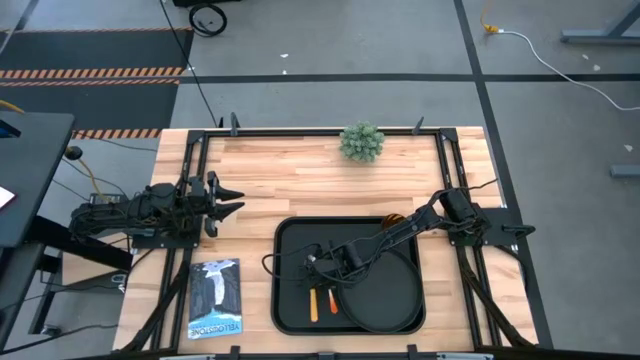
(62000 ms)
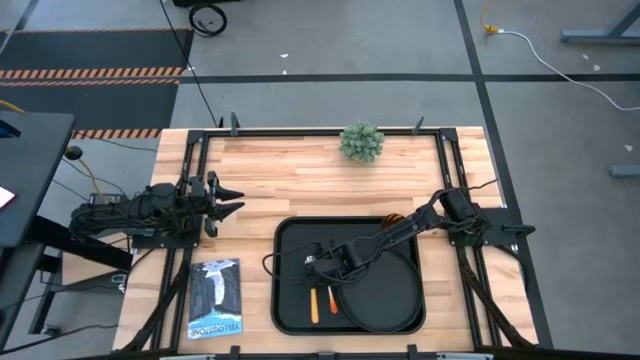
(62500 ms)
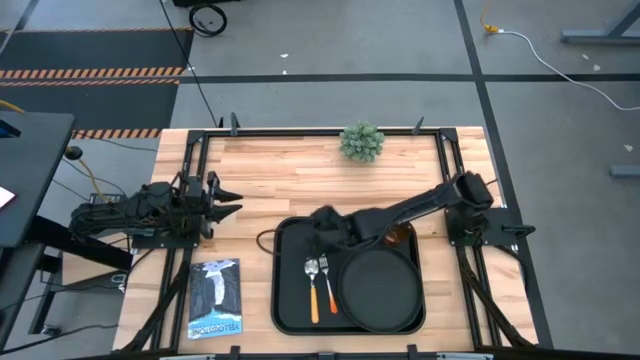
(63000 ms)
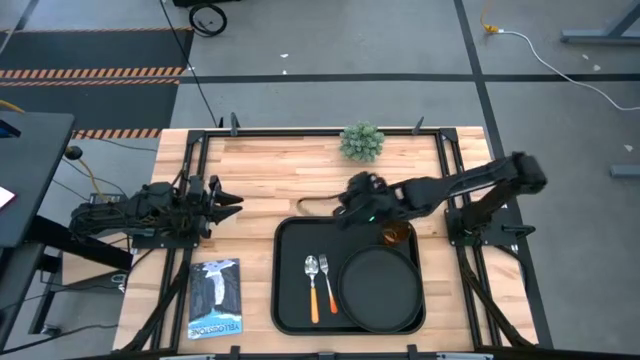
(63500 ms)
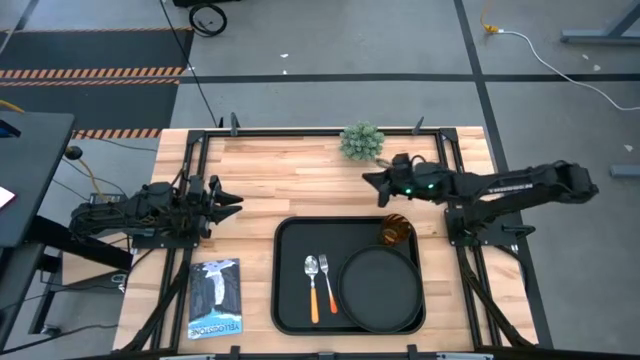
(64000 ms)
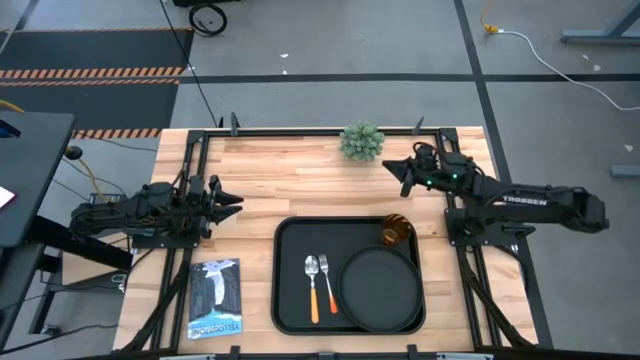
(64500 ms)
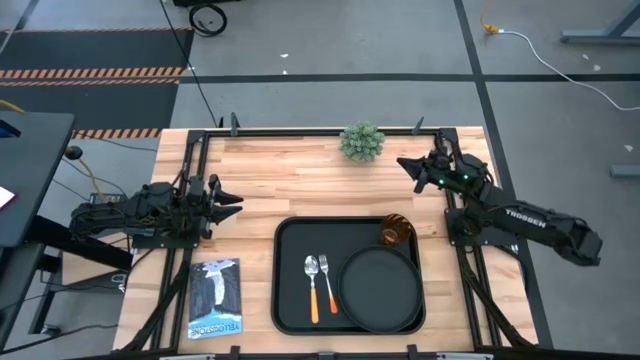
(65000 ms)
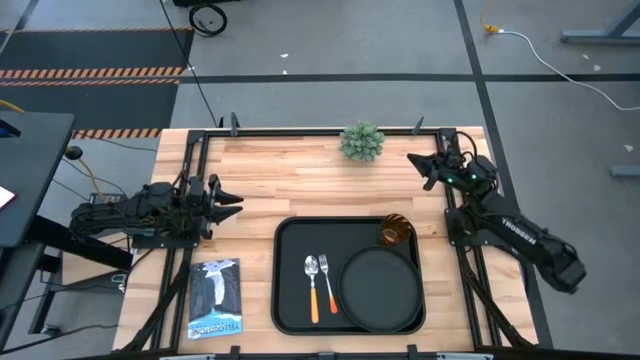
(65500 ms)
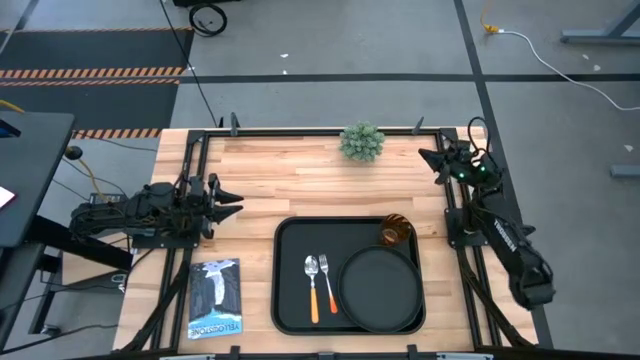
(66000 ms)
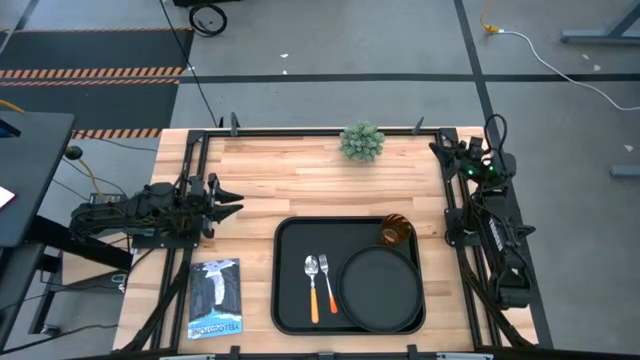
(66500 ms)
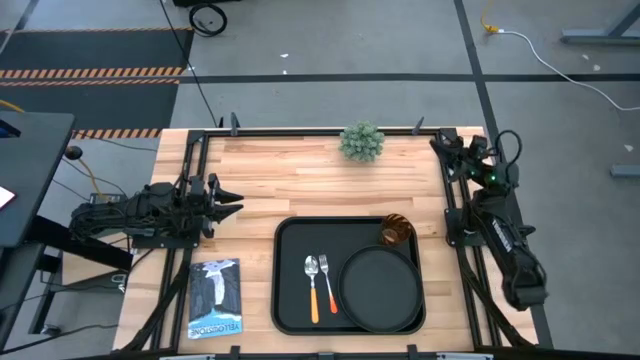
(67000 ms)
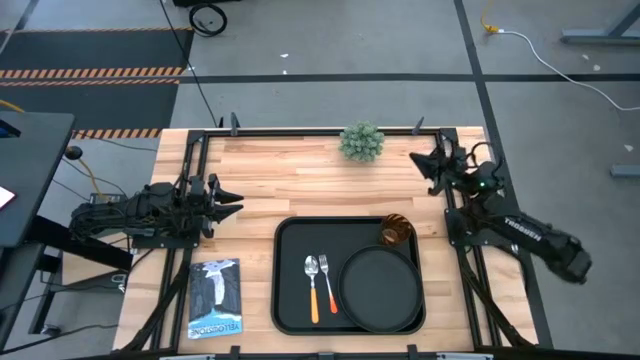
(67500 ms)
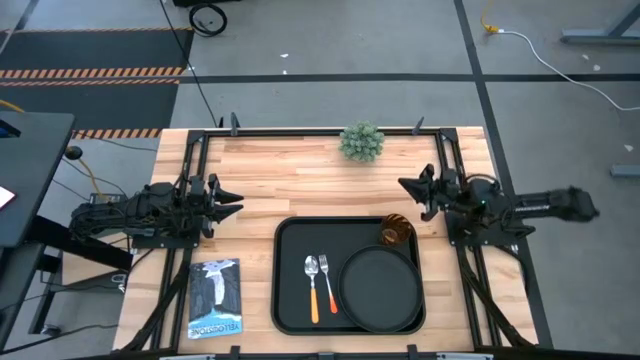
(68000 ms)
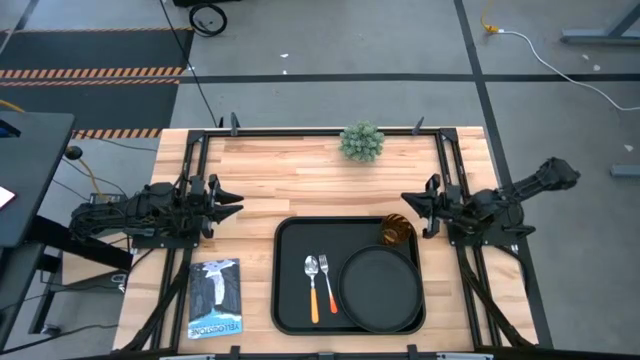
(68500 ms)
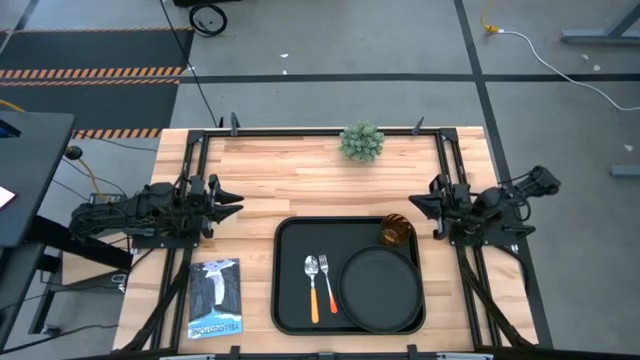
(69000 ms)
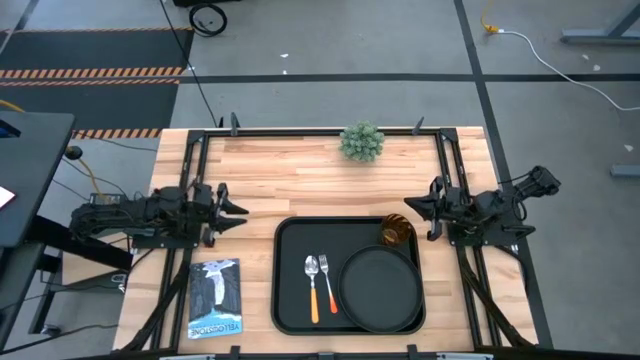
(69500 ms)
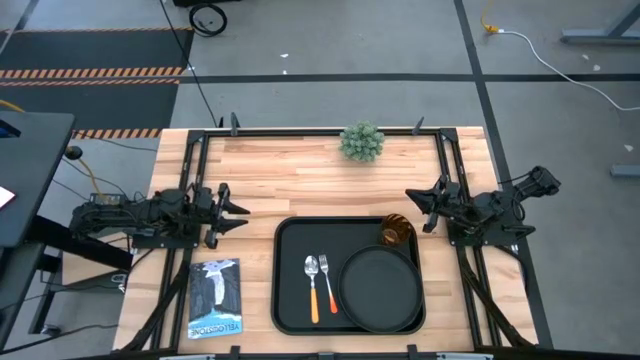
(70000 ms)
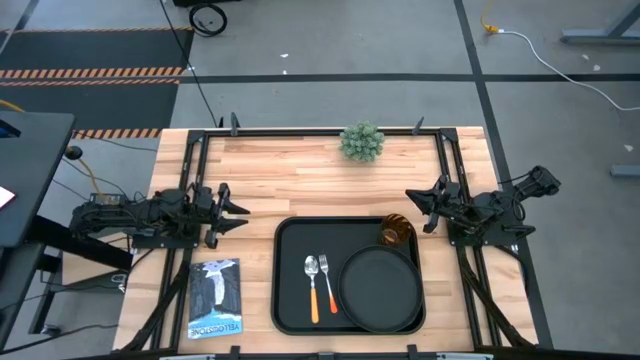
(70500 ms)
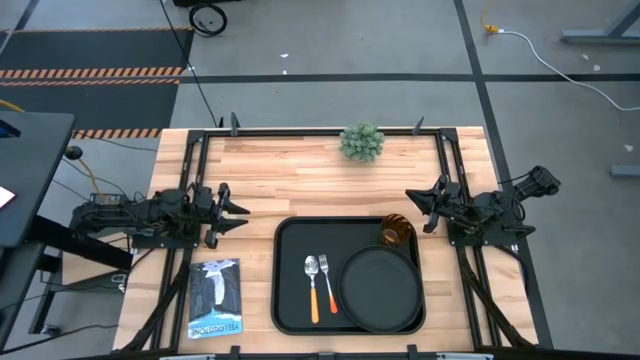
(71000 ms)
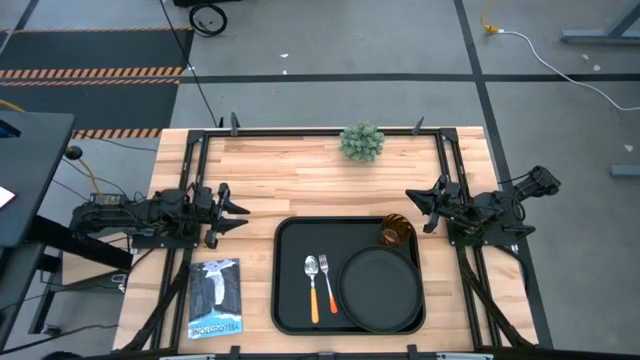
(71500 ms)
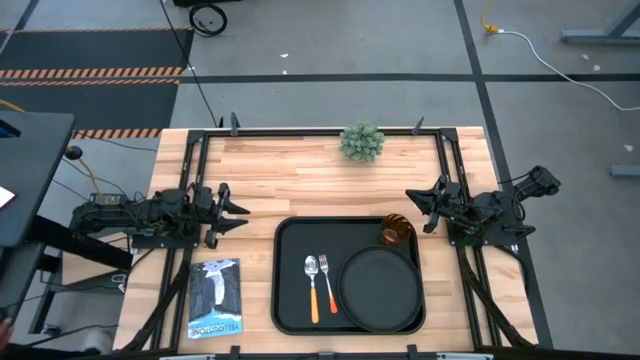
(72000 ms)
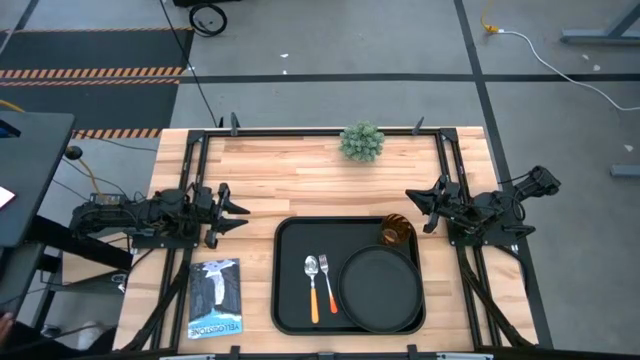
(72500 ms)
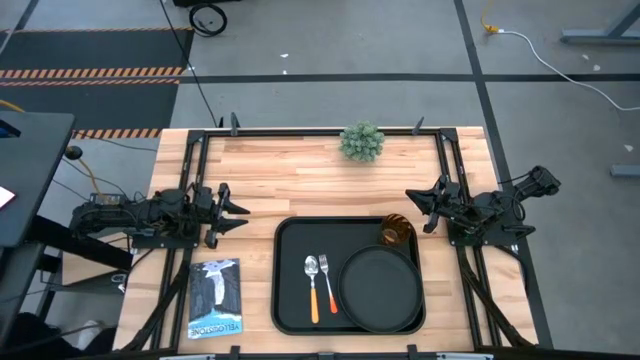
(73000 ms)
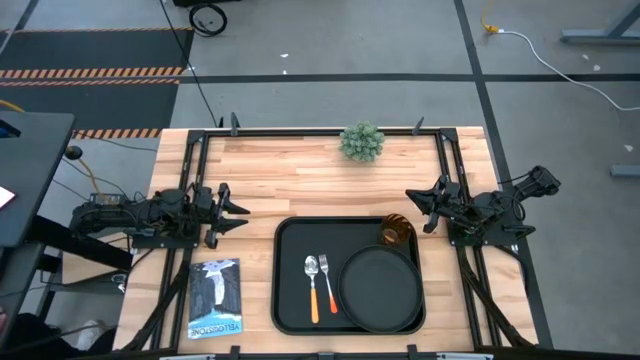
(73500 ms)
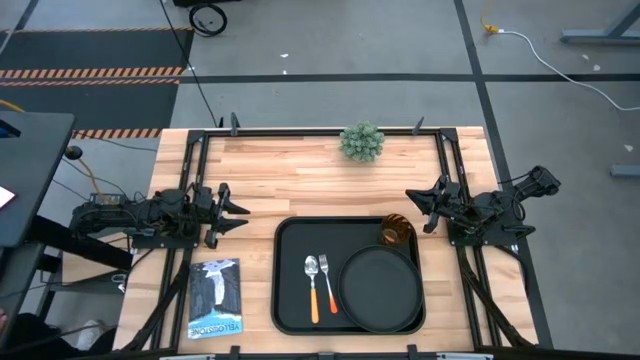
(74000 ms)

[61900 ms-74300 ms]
Task: Pick and place plate/cup/fork/spoon on tray
Return to Home Position

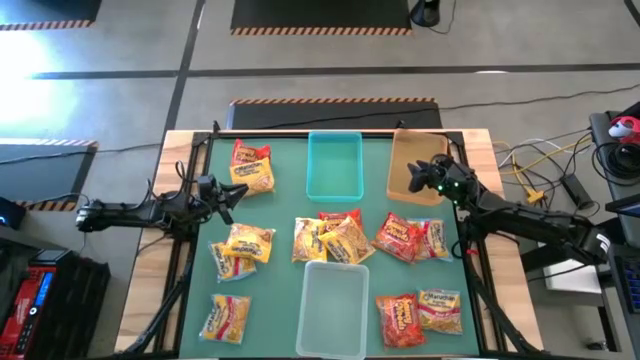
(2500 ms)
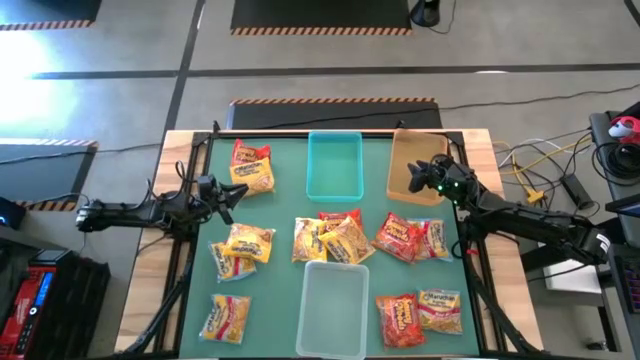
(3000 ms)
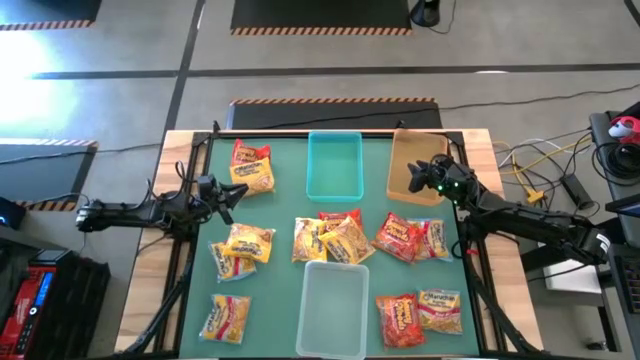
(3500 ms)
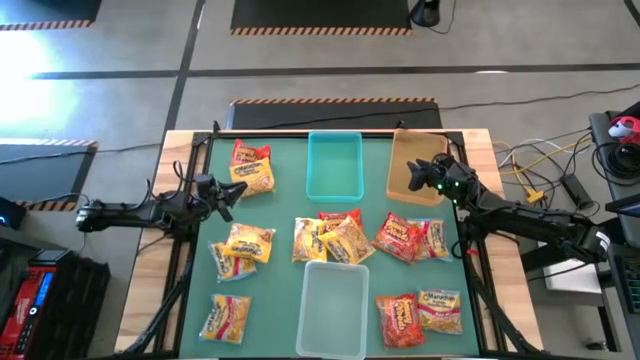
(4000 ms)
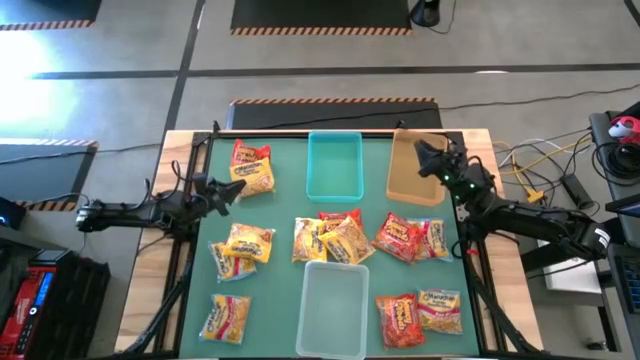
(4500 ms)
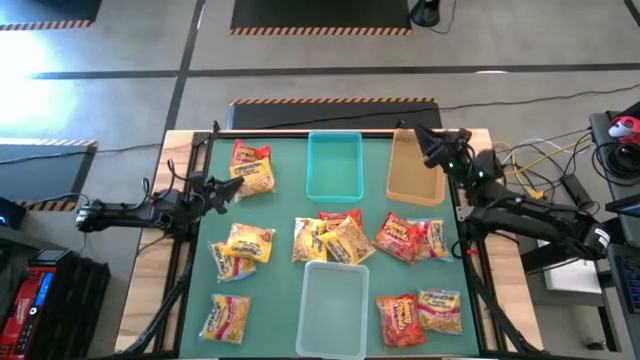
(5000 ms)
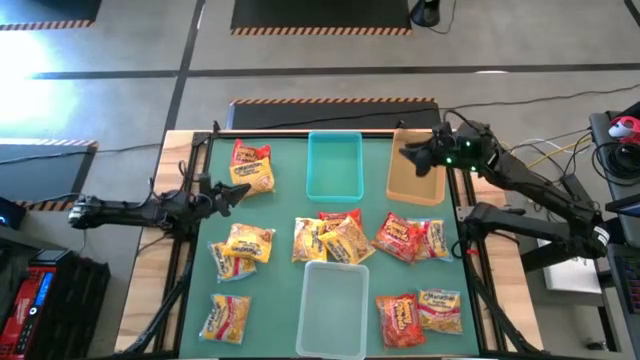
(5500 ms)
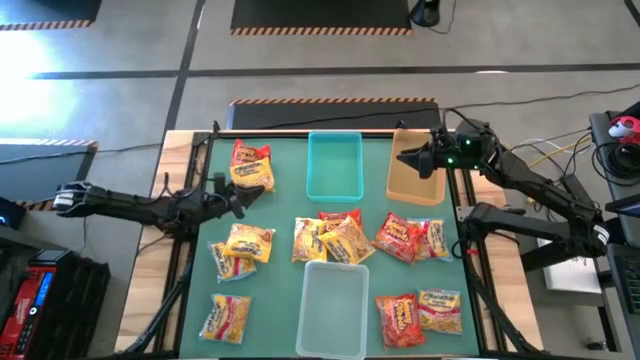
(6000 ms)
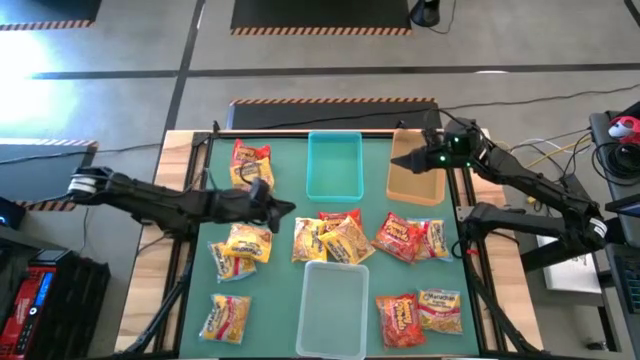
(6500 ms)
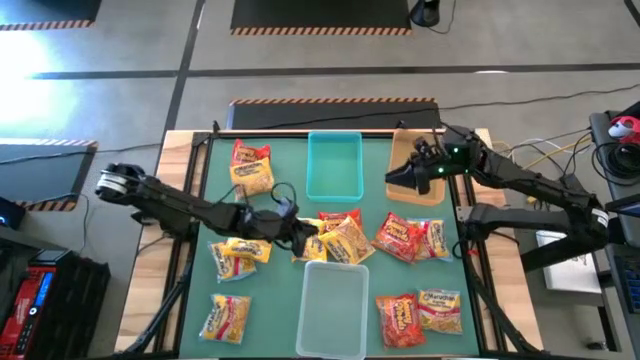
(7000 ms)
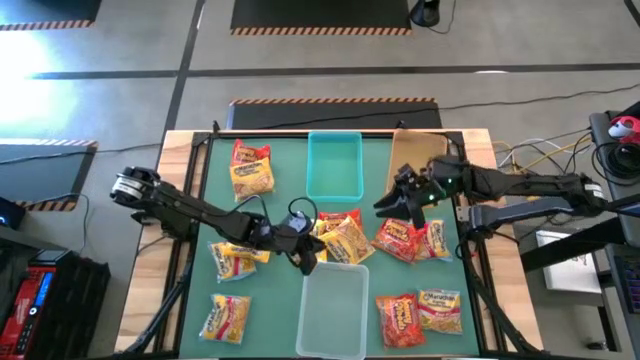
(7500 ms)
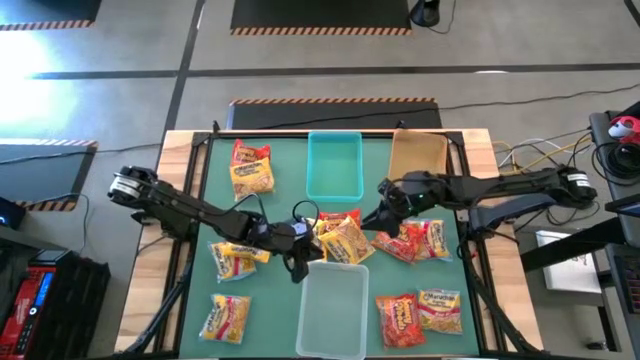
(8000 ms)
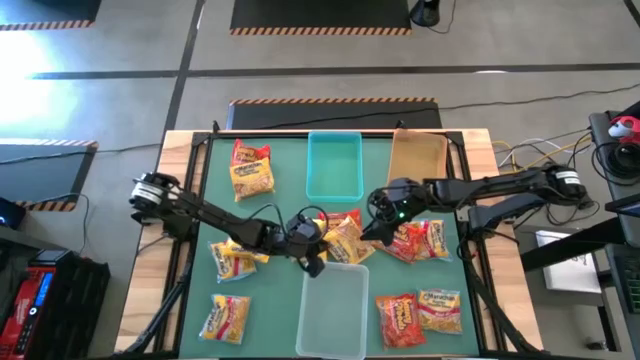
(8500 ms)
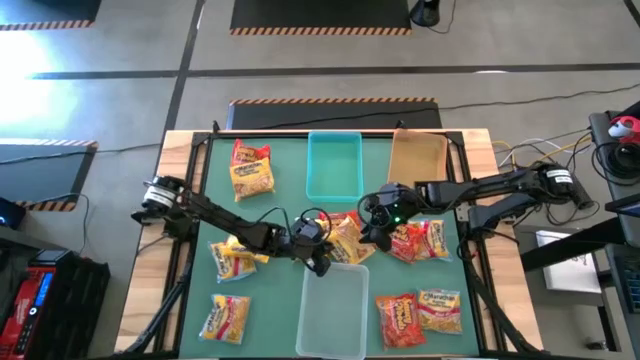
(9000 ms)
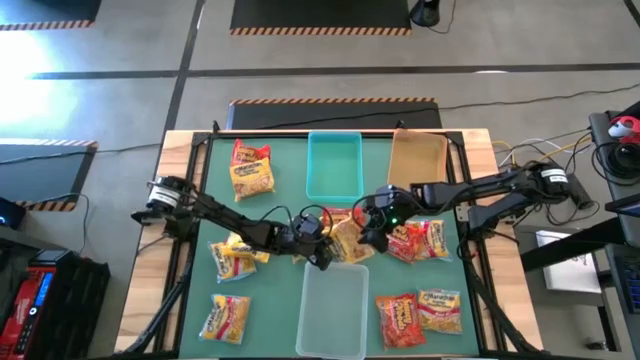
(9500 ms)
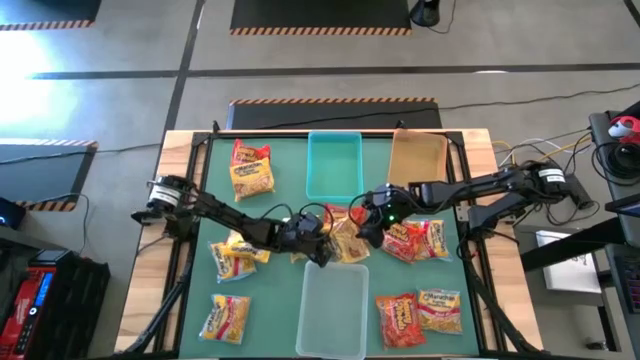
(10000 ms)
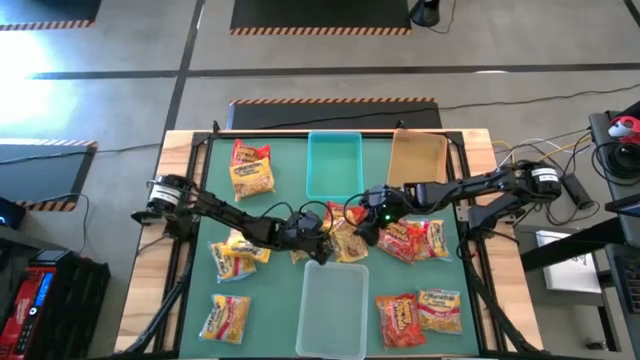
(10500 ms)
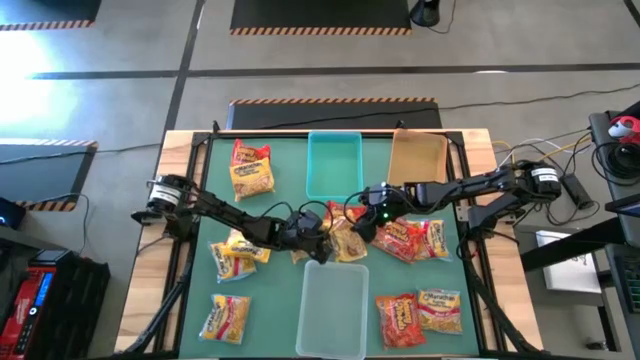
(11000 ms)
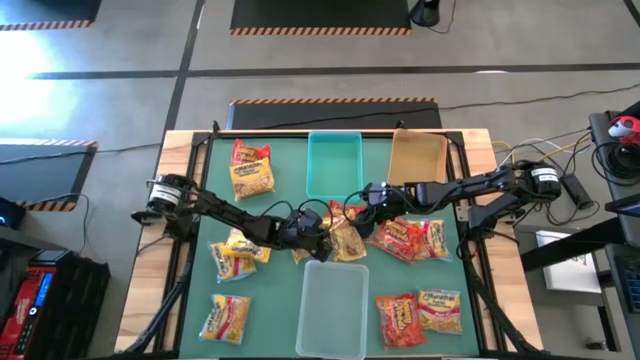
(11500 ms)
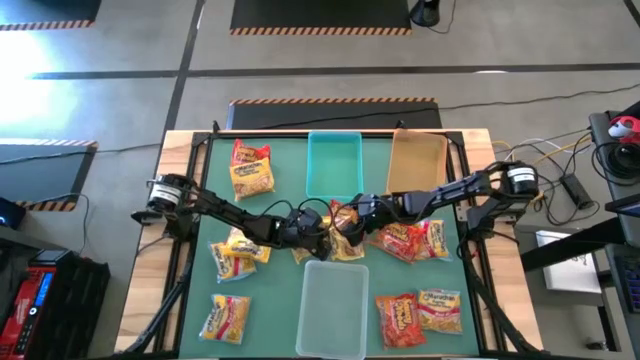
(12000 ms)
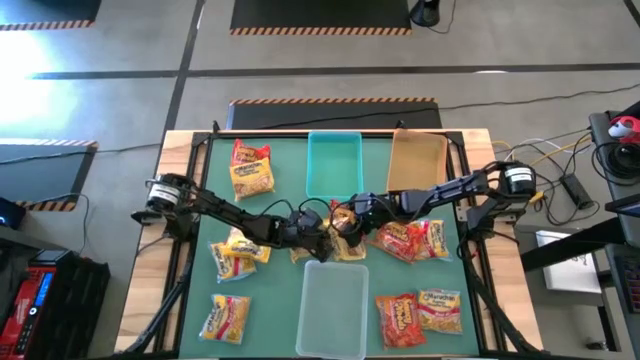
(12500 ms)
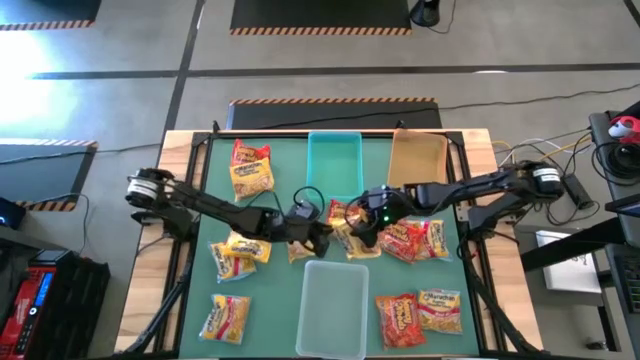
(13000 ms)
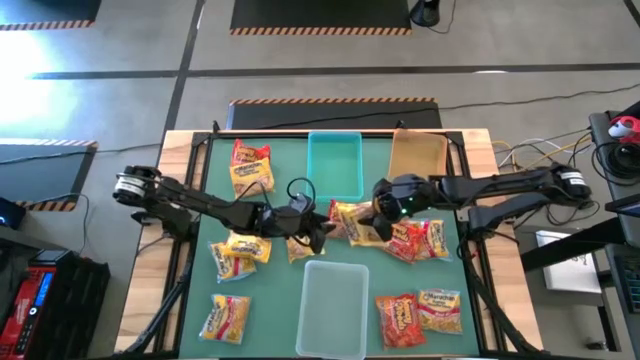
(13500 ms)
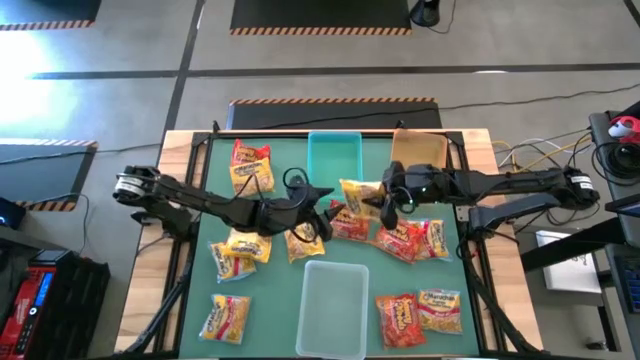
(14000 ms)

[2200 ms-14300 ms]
Task: Sort Maruchan noodles
Put the yellow noodle pack into the orange bin
